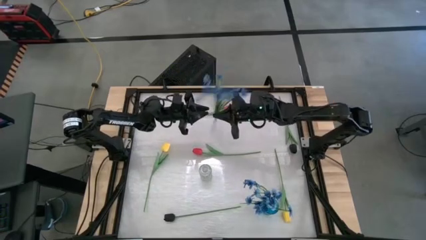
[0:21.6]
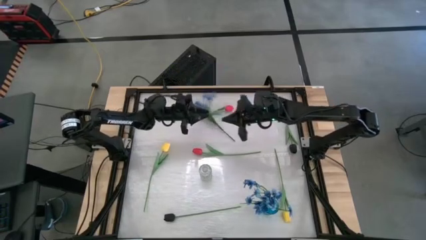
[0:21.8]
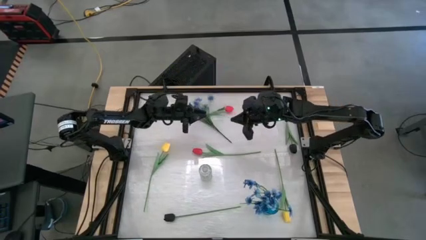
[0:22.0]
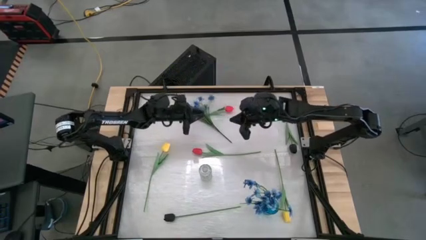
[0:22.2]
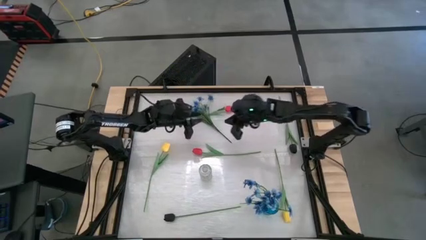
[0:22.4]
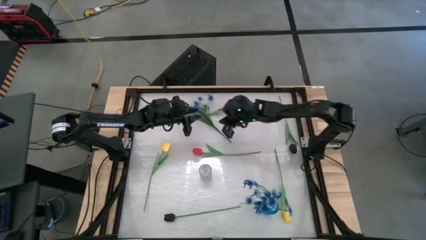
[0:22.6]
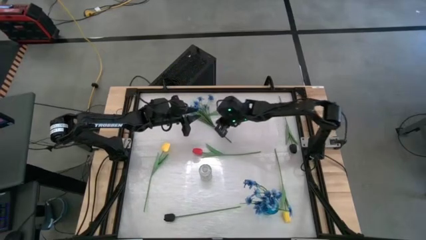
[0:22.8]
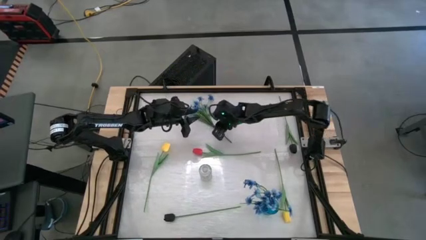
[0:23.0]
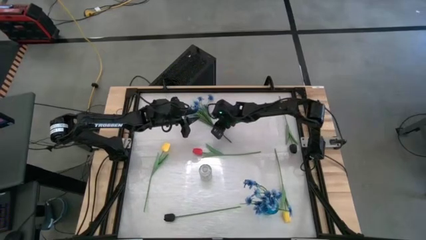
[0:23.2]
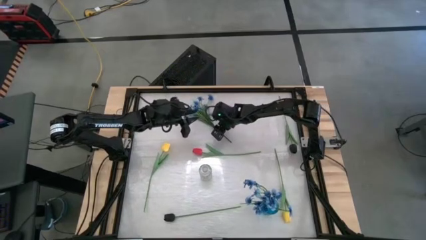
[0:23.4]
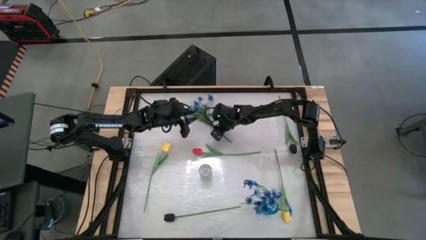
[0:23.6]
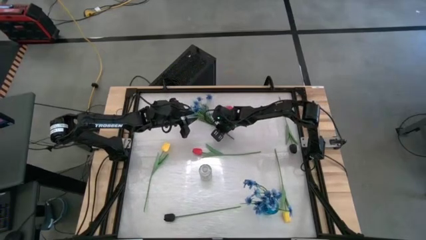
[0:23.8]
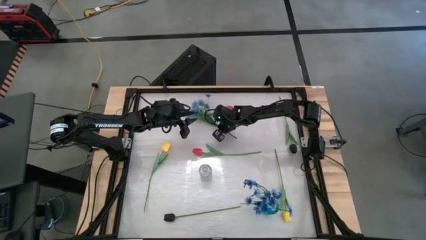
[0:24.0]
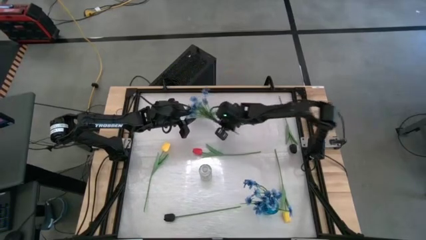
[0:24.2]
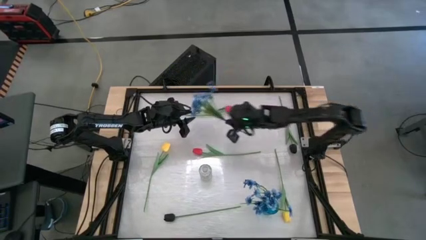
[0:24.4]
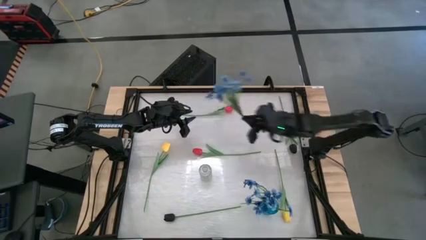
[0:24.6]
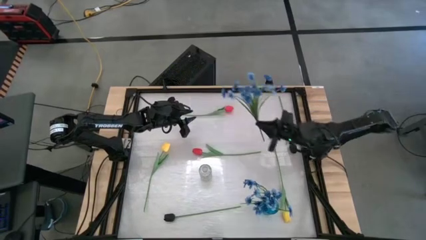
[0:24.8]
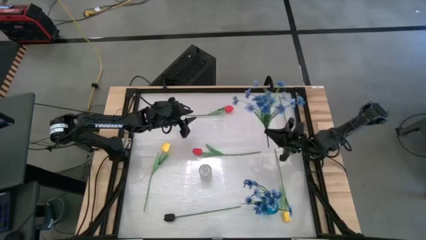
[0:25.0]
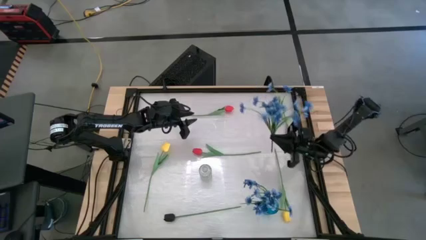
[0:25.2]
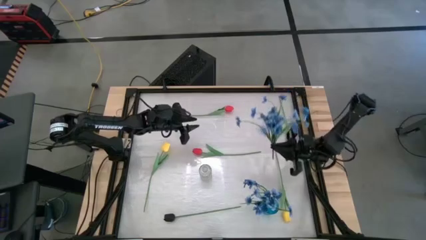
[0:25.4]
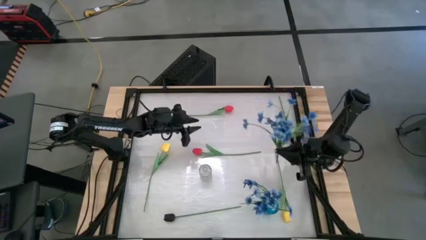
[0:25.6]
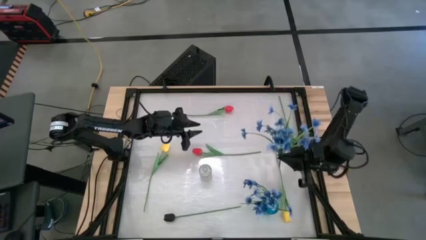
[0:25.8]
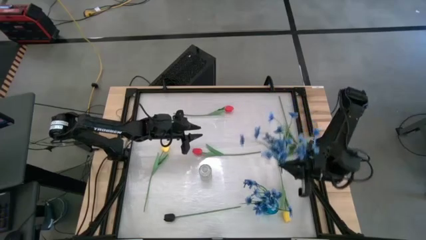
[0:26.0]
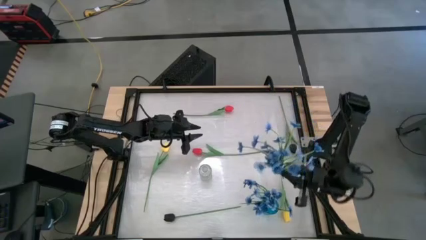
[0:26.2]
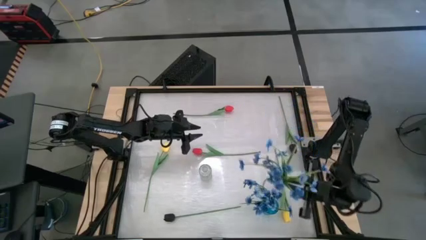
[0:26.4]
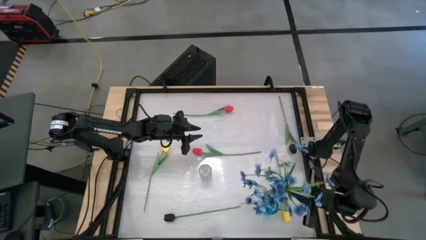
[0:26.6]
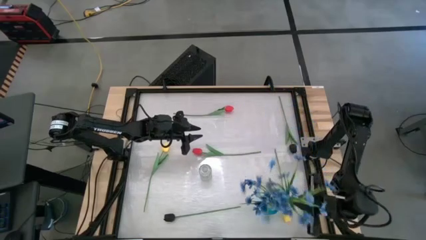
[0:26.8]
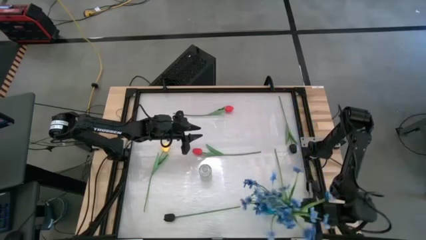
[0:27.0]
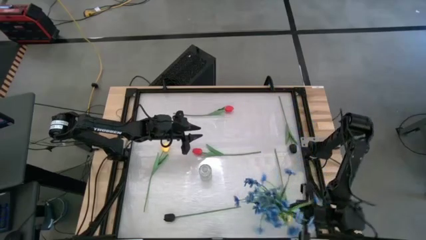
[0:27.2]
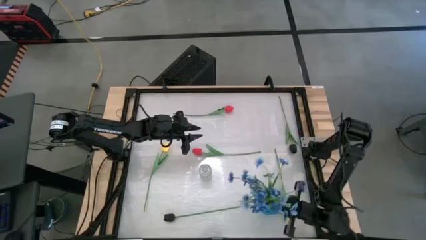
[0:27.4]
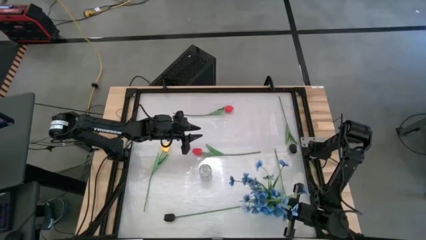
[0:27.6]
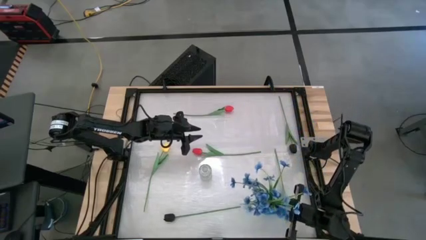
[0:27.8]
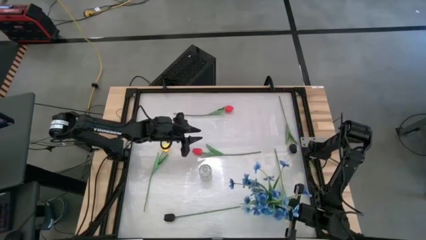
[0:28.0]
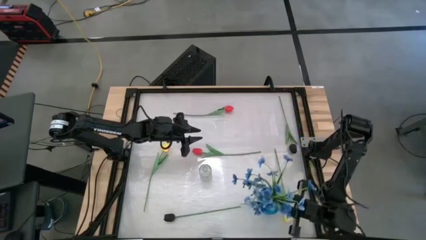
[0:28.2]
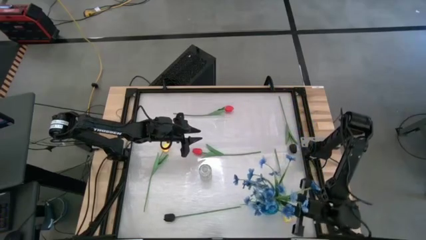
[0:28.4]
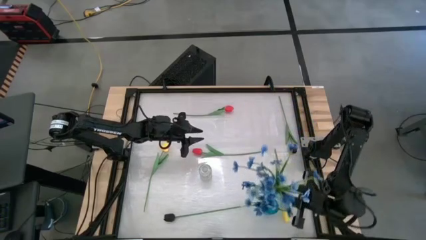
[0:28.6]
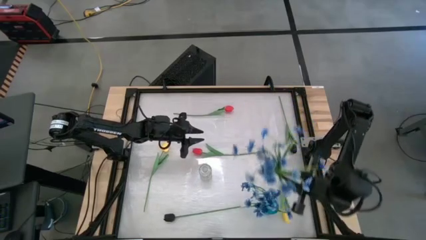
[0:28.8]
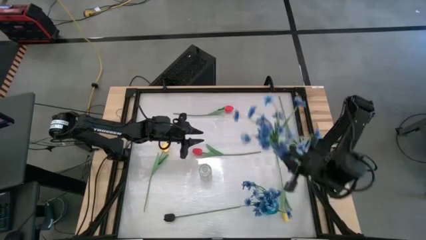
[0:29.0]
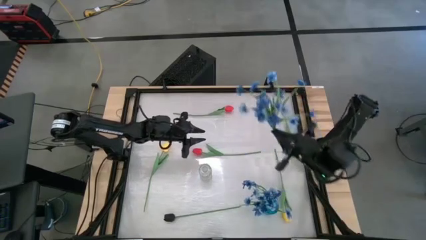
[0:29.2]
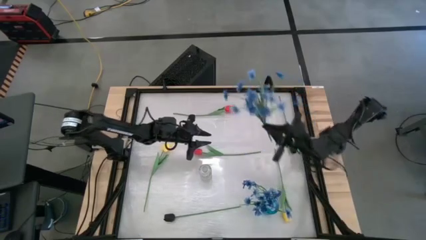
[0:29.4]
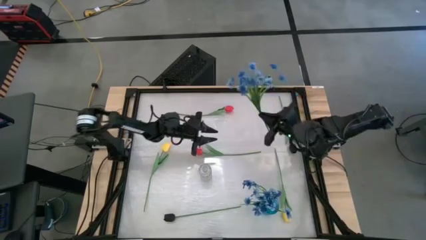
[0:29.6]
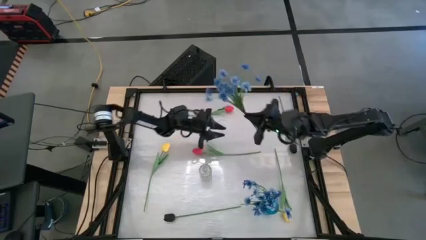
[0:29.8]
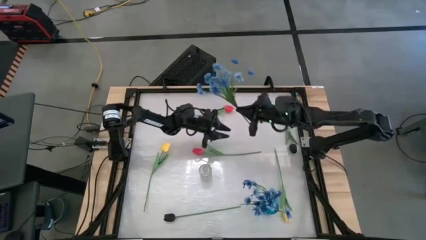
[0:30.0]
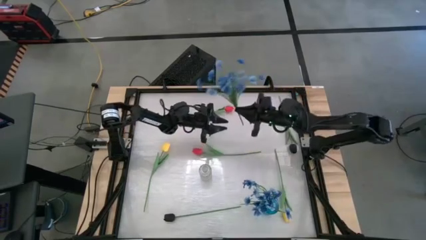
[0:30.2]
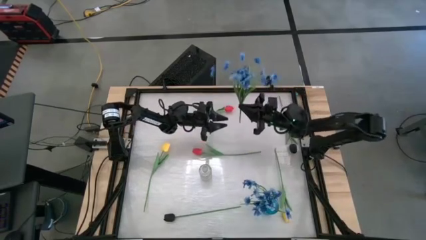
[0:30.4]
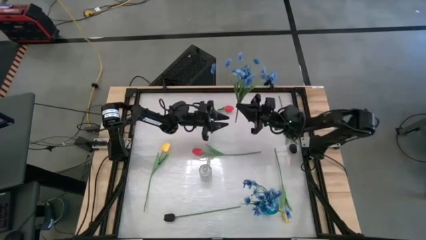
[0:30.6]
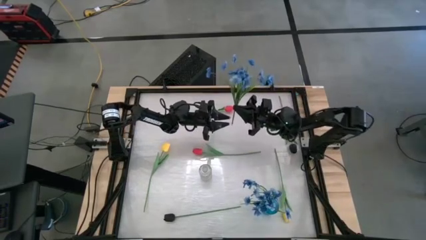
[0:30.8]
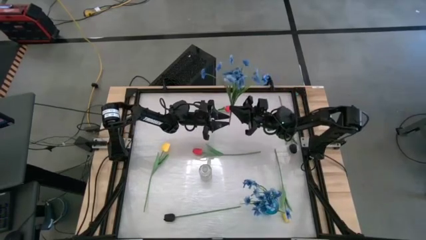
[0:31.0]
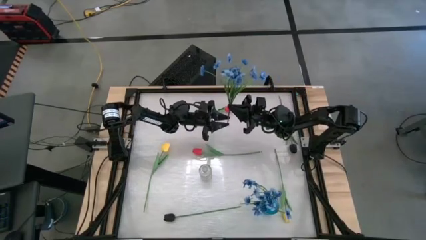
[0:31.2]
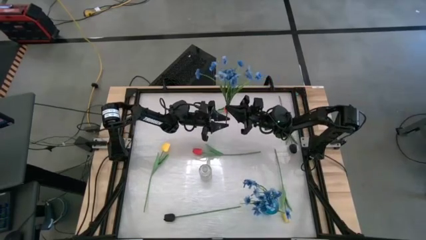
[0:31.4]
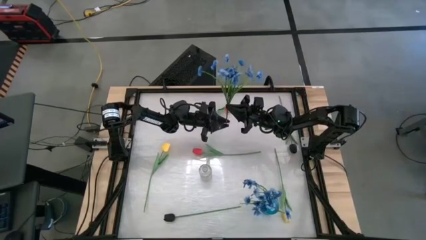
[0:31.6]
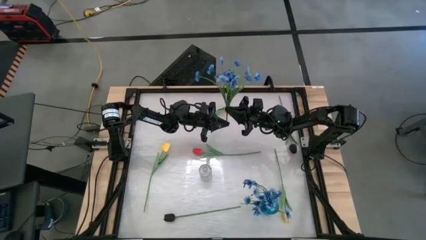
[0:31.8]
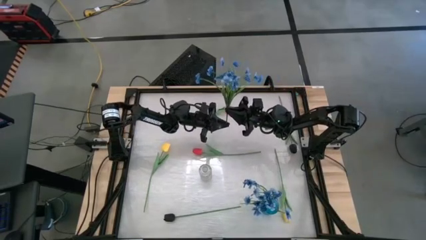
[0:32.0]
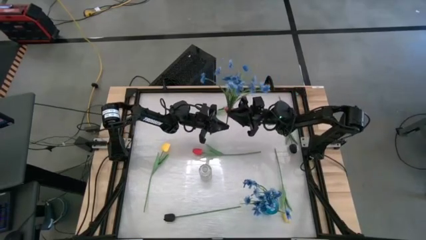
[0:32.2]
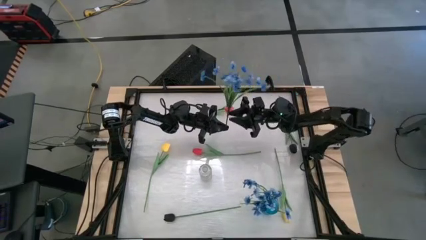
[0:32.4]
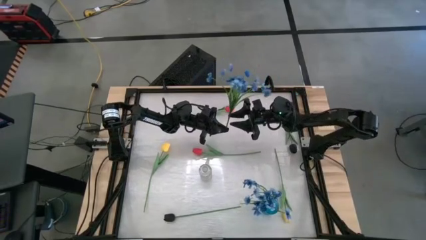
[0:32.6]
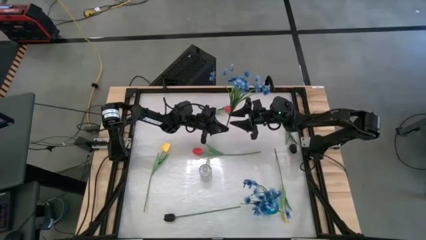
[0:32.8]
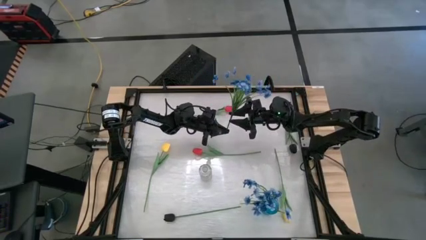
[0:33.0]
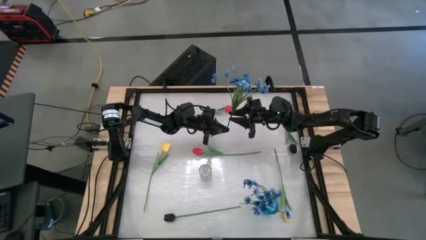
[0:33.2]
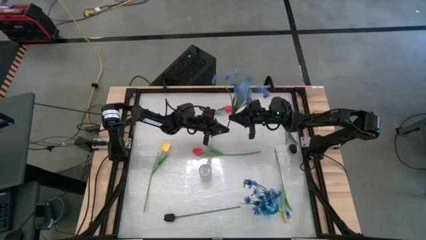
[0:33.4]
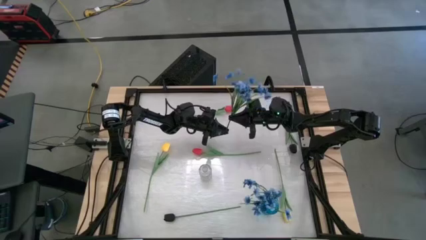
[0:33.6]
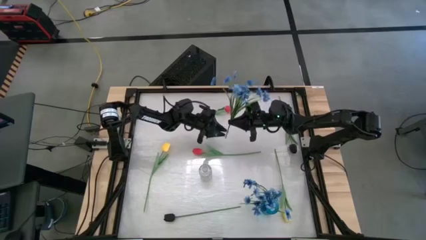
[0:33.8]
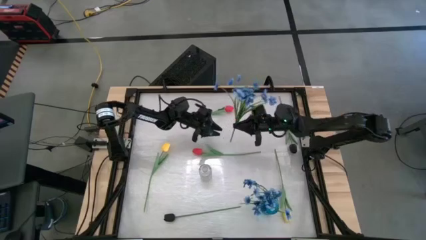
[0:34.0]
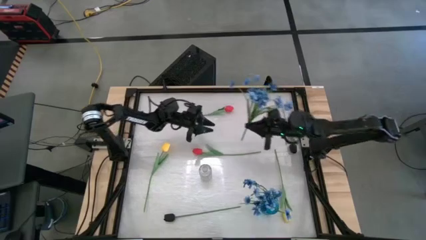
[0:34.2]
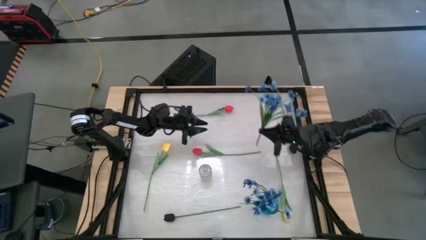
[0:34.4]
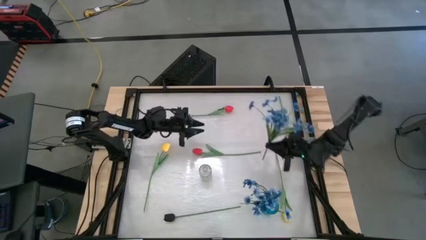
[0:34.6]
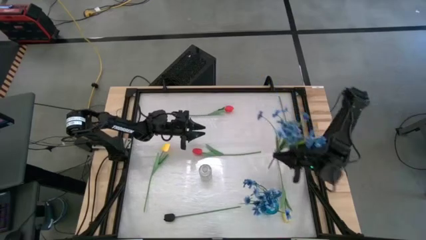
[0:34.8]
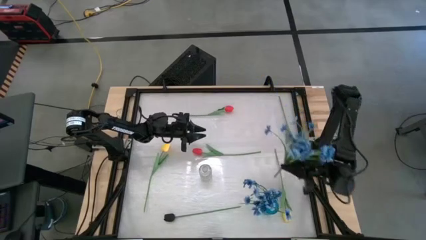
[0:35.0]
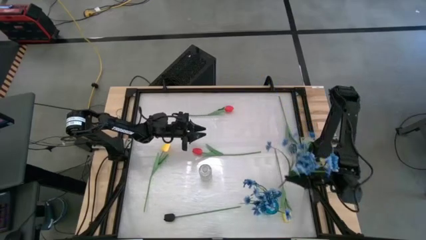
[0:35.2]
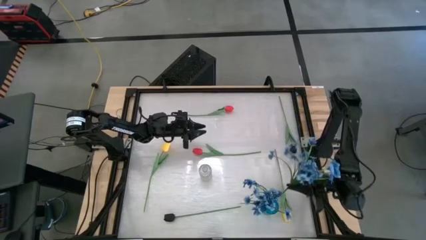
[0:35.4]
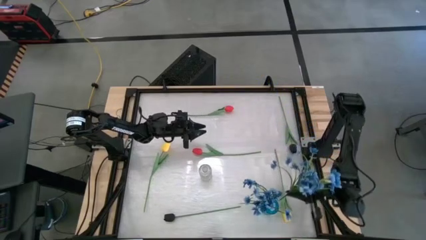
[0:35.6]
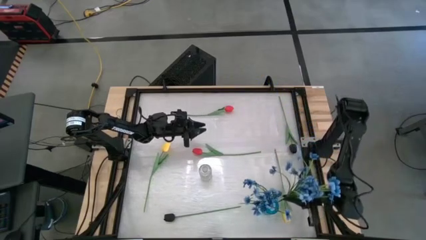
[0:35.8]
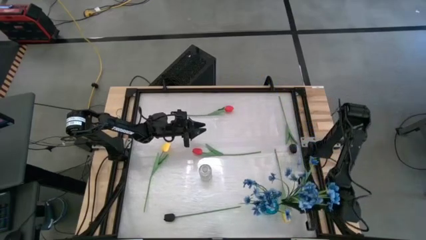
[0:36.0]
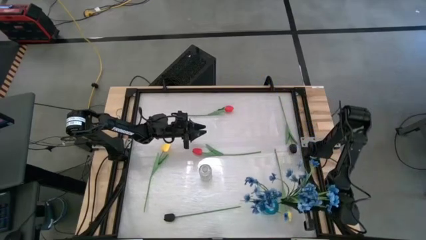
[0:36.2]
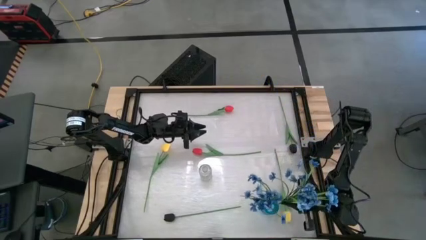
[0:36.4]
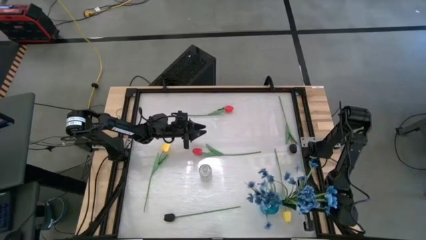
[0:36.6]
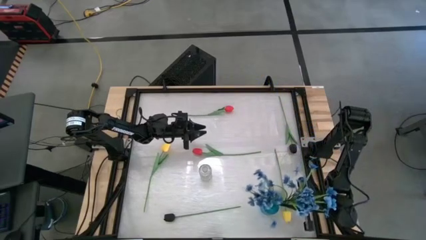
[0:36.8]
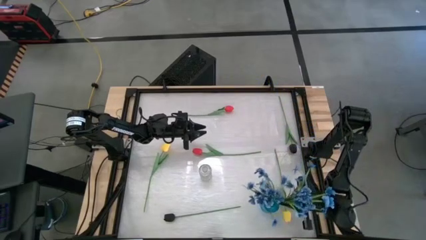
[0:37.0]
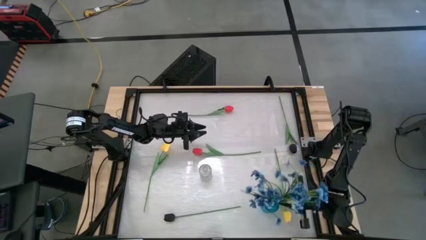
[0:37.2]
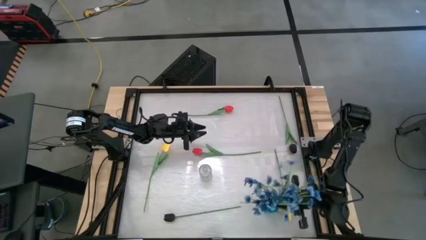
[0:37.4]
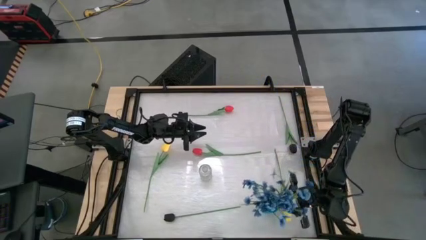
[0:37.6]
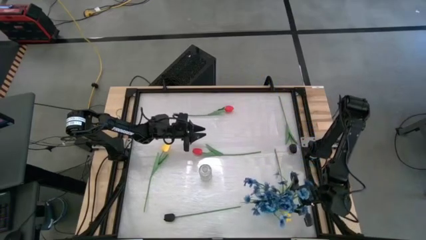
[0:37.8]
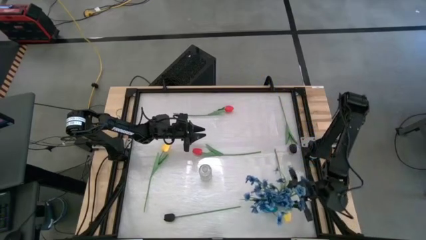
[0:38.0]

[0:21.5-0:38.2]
Task: Sort flowers into vase by color
Put the blue flowers into the blue vase
